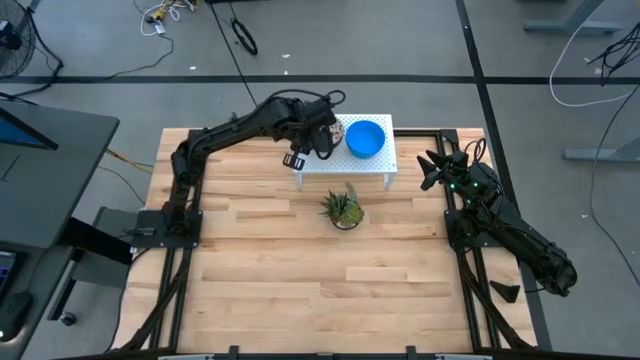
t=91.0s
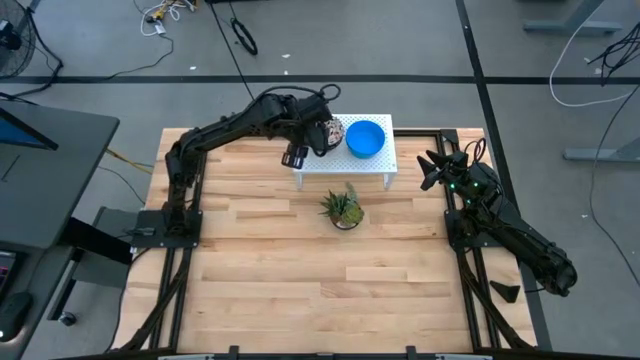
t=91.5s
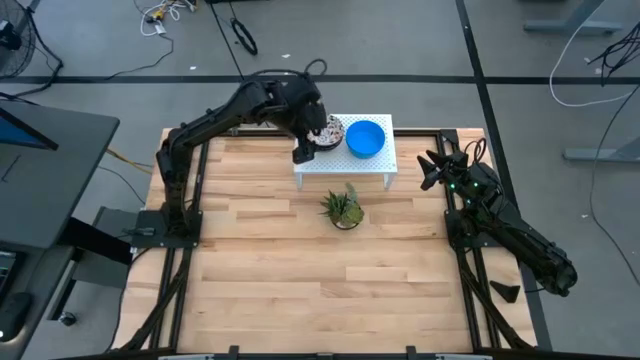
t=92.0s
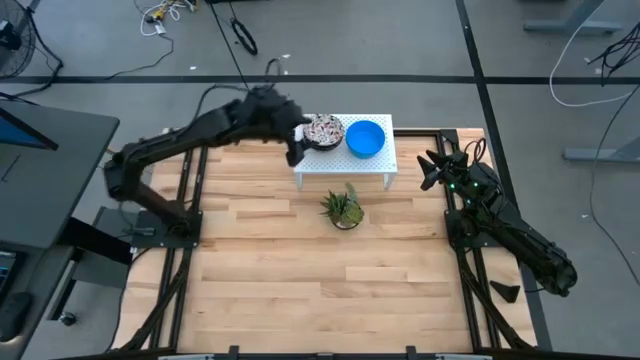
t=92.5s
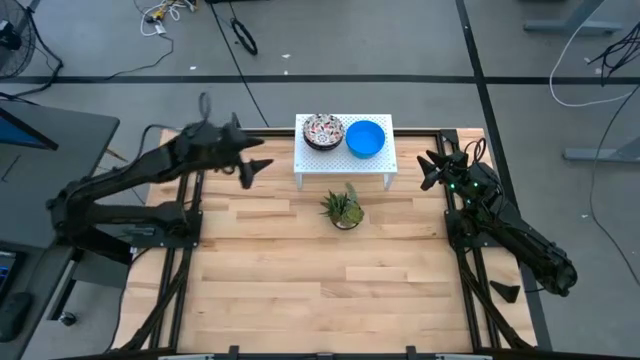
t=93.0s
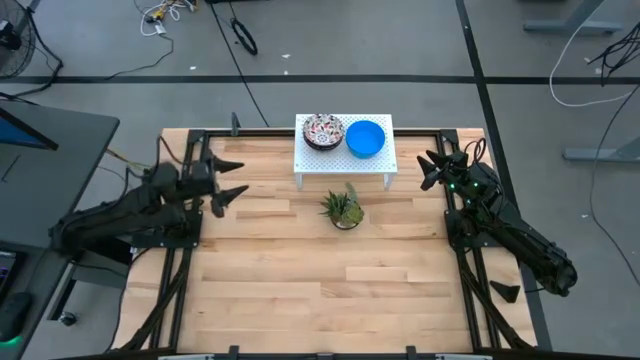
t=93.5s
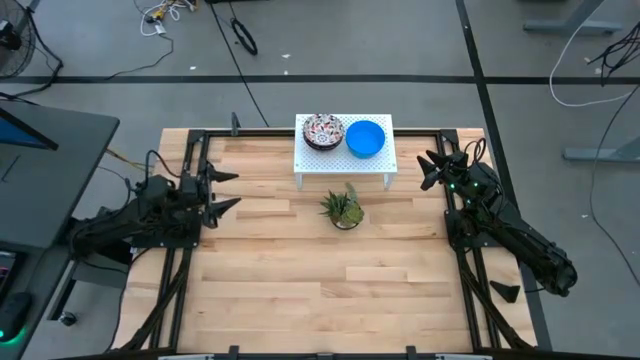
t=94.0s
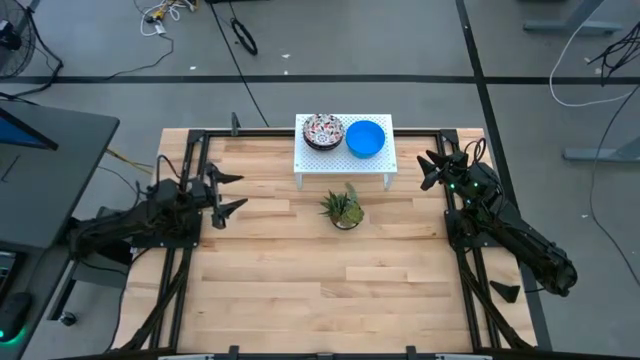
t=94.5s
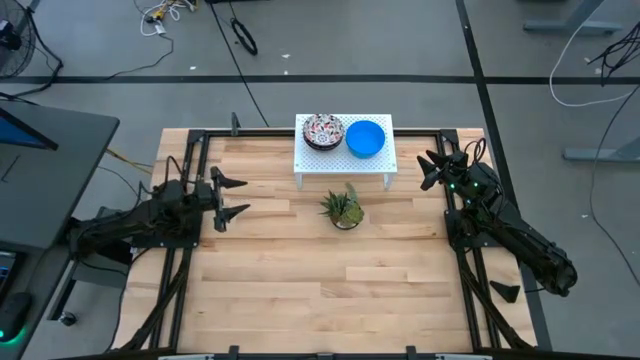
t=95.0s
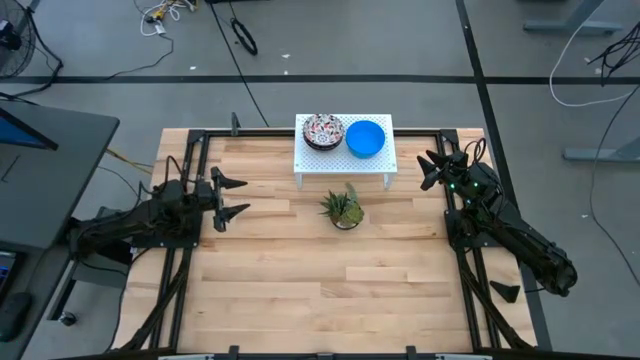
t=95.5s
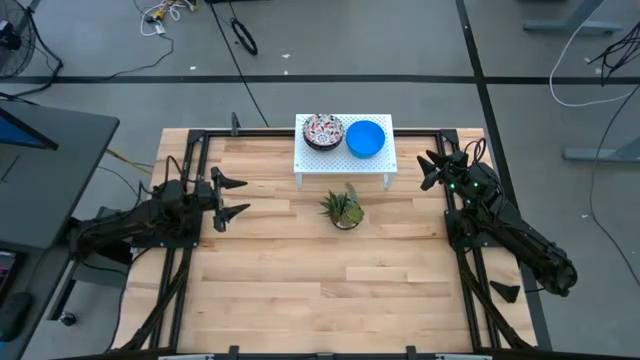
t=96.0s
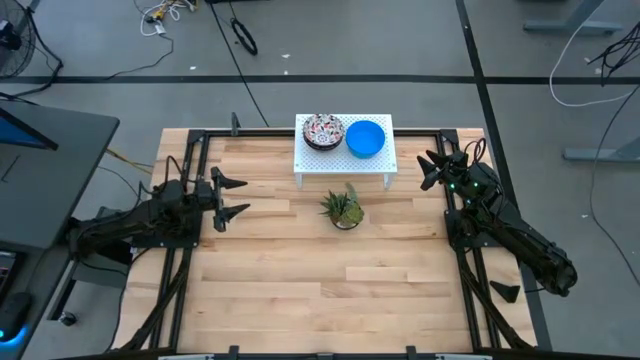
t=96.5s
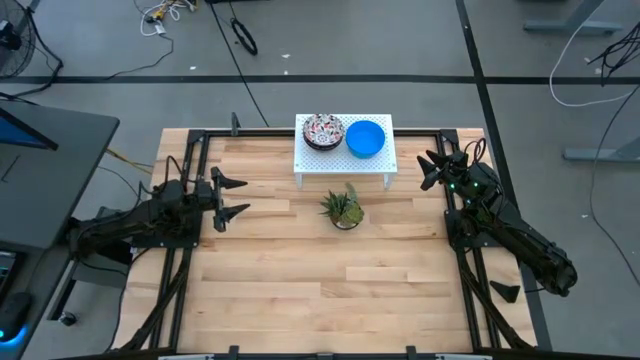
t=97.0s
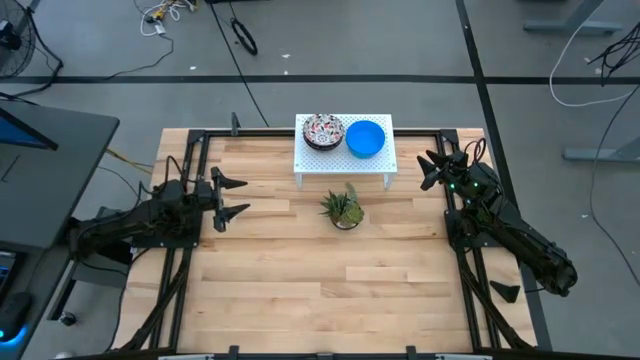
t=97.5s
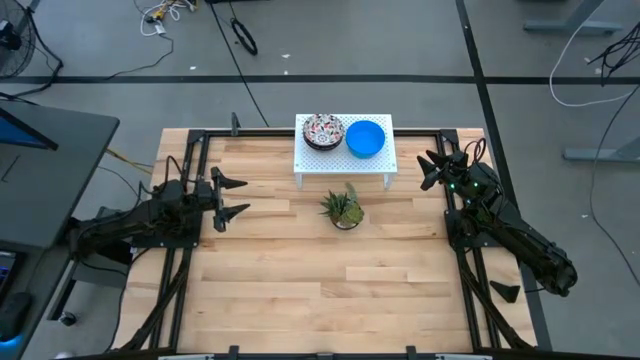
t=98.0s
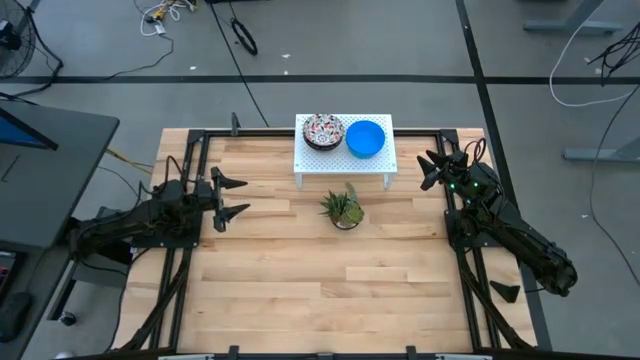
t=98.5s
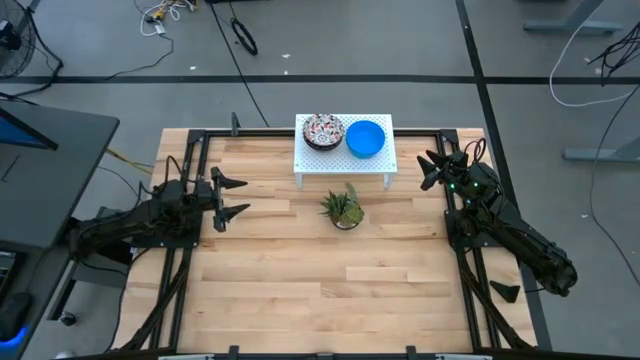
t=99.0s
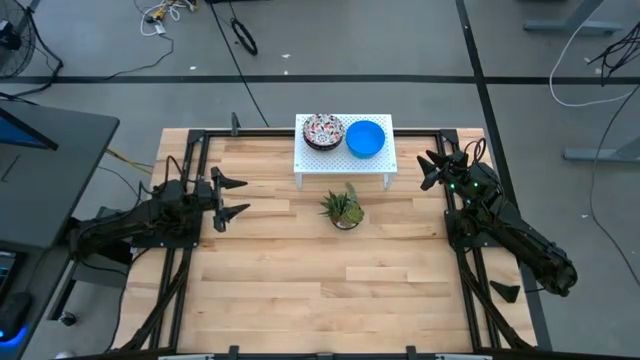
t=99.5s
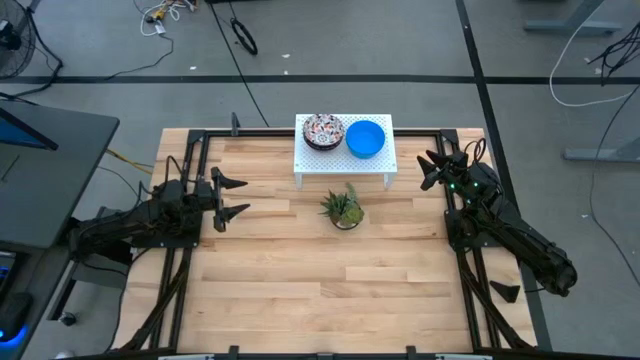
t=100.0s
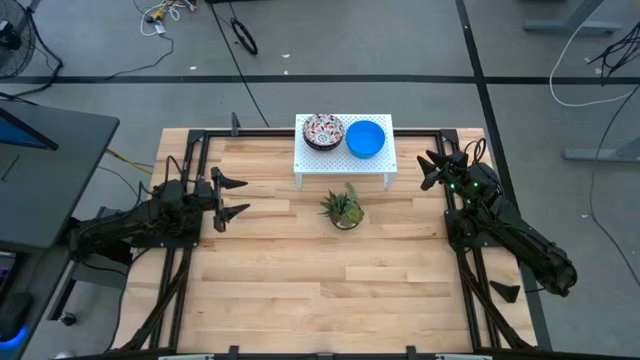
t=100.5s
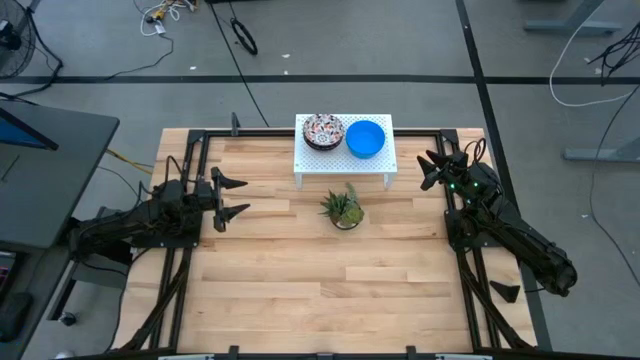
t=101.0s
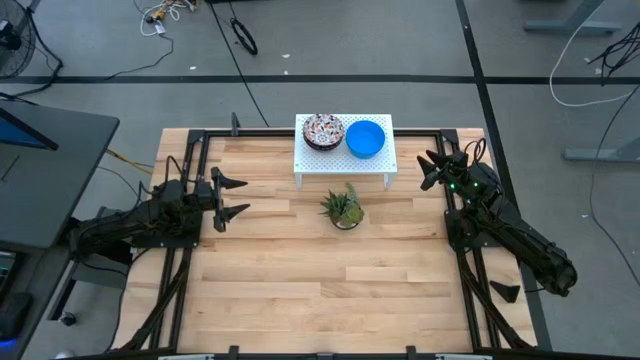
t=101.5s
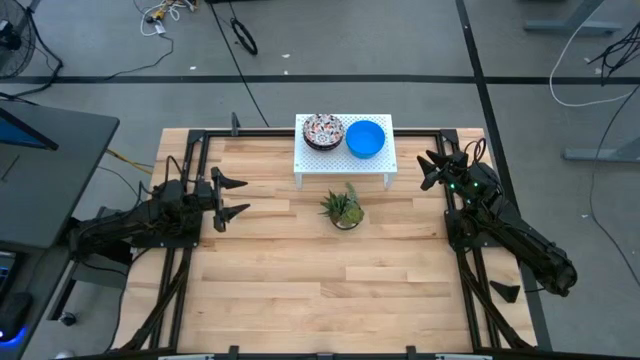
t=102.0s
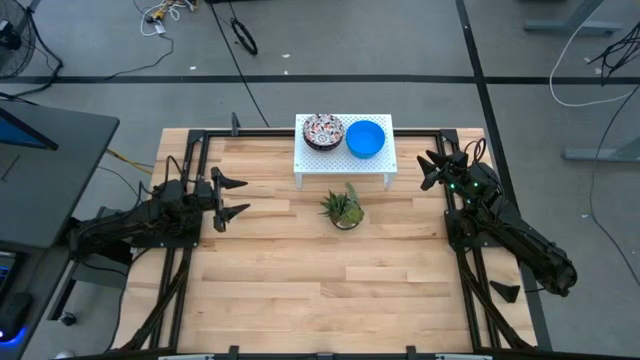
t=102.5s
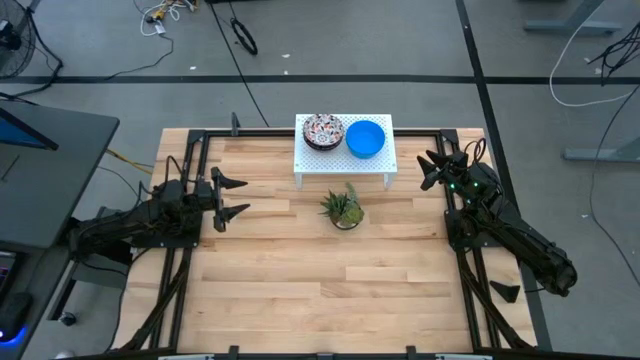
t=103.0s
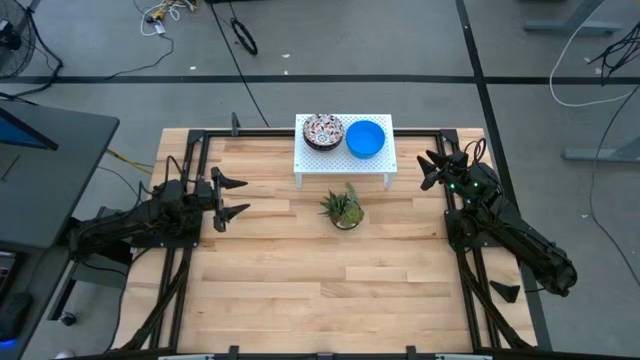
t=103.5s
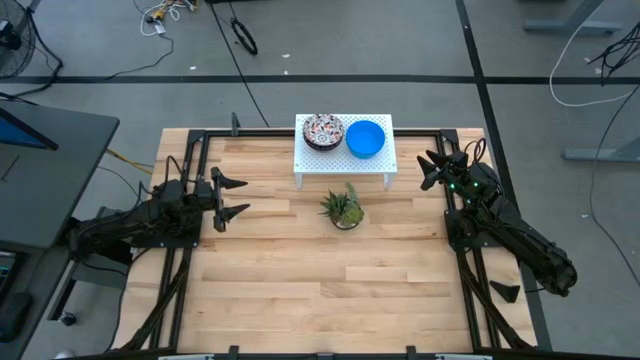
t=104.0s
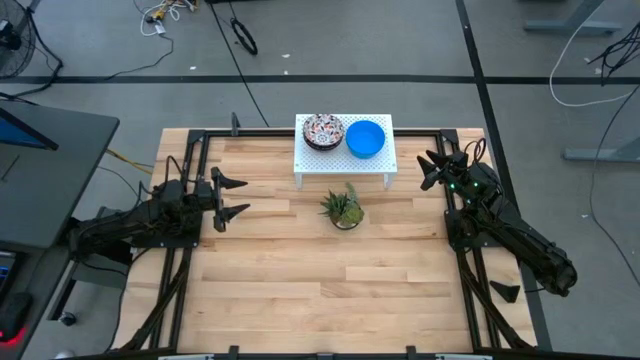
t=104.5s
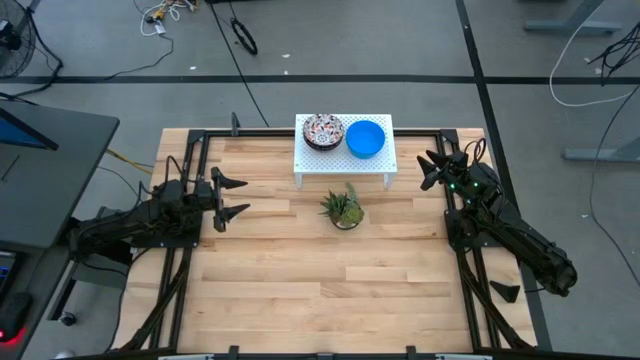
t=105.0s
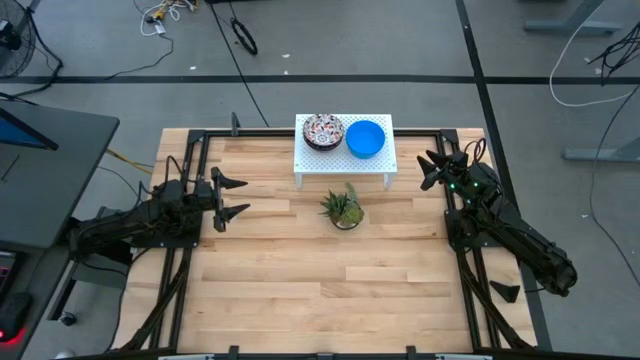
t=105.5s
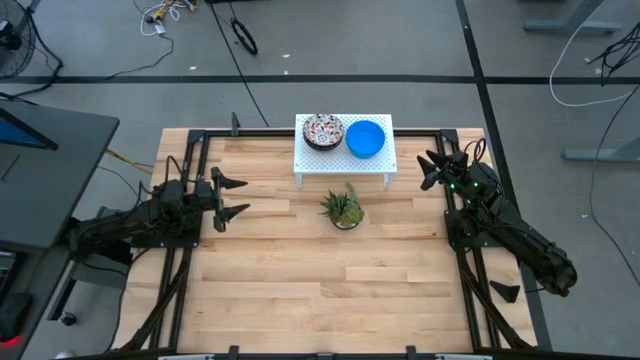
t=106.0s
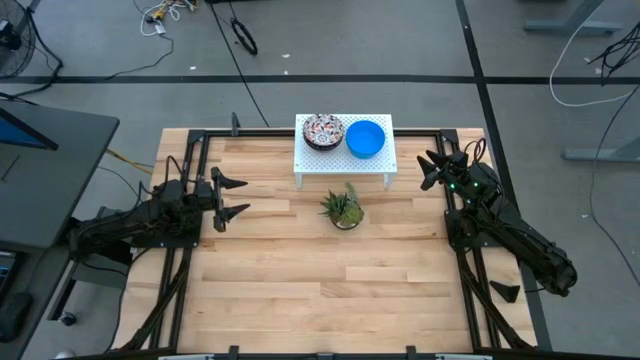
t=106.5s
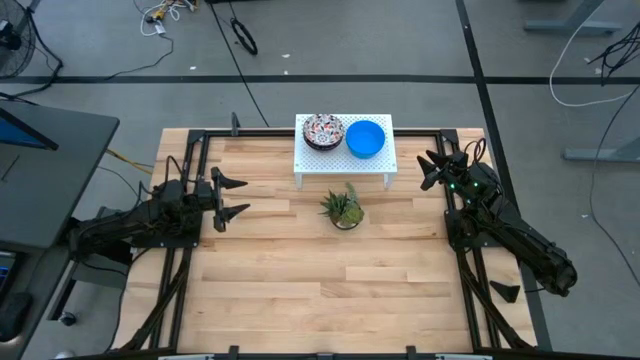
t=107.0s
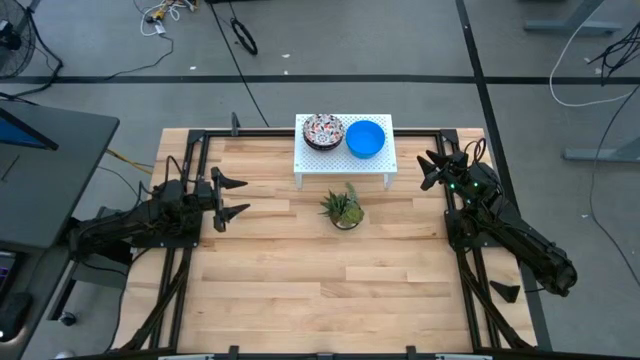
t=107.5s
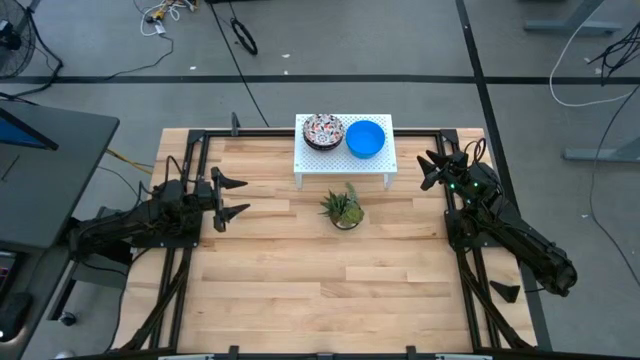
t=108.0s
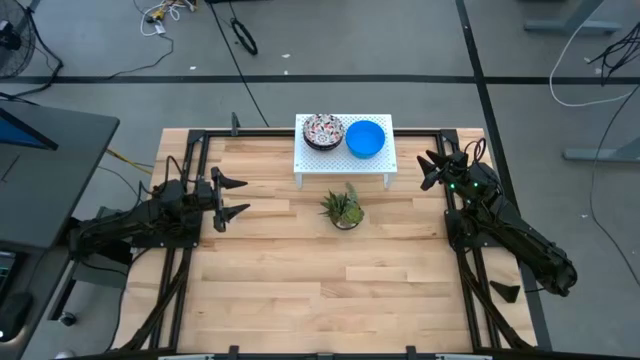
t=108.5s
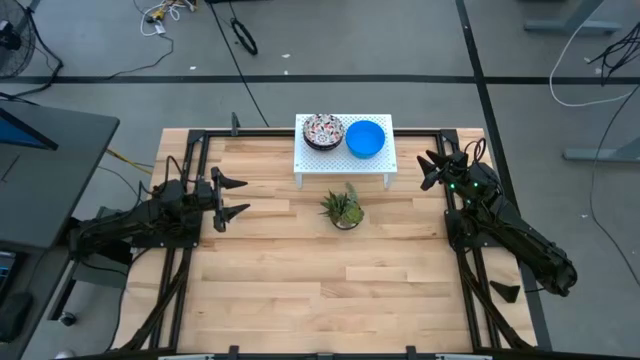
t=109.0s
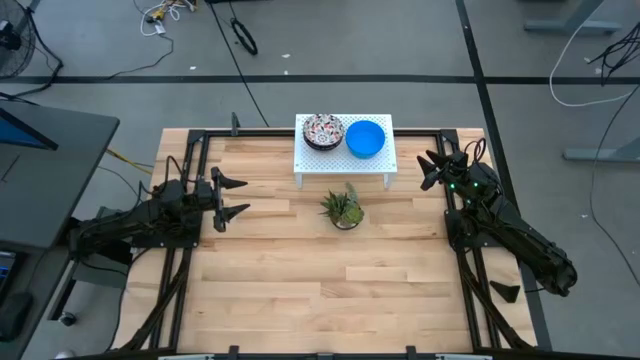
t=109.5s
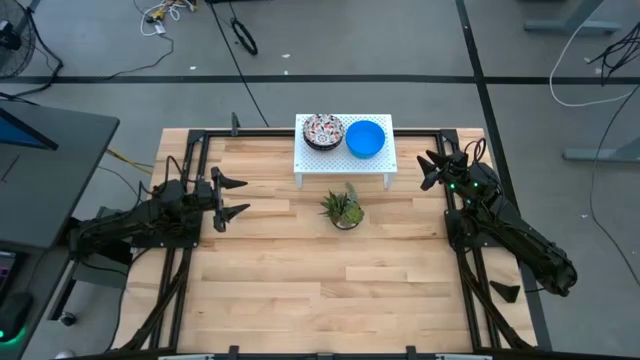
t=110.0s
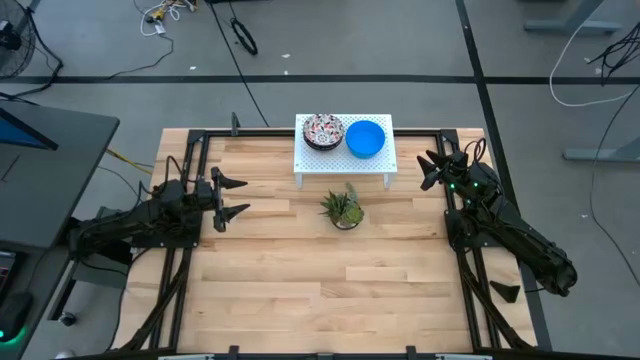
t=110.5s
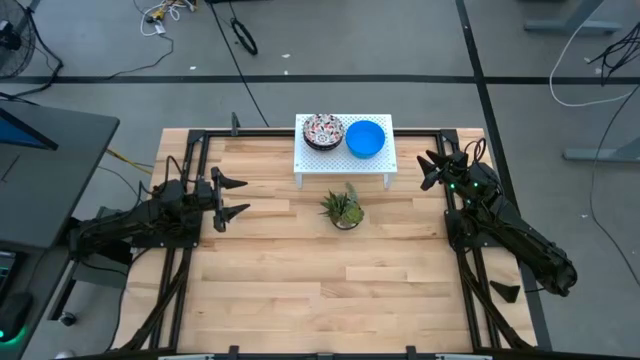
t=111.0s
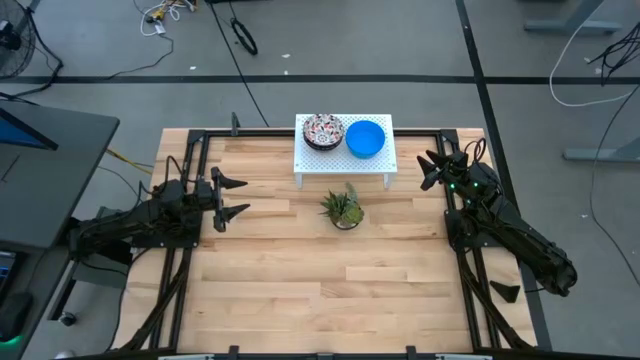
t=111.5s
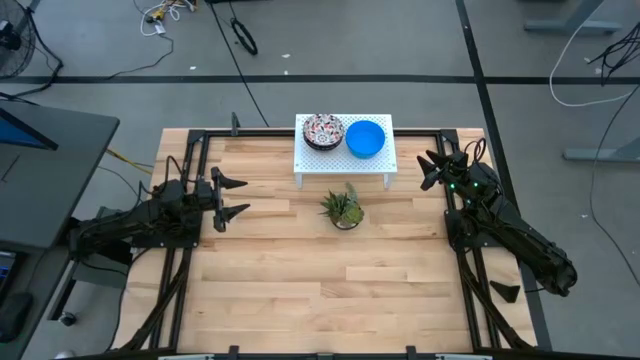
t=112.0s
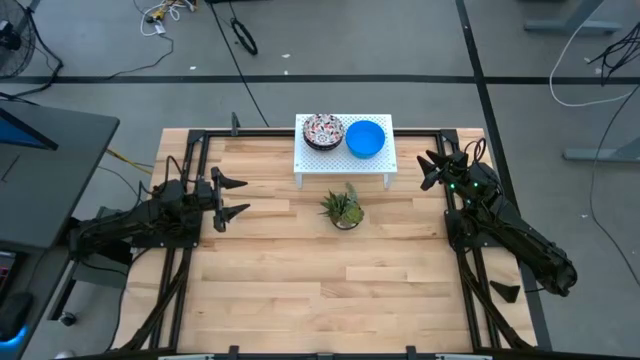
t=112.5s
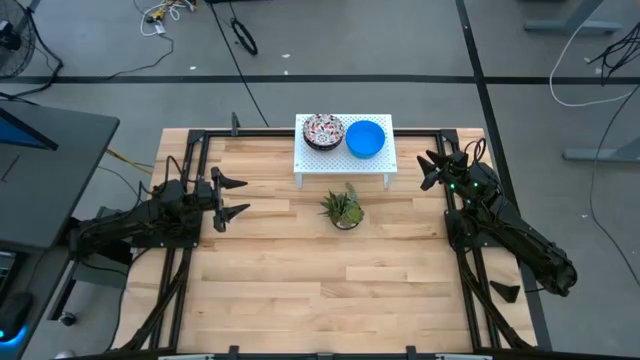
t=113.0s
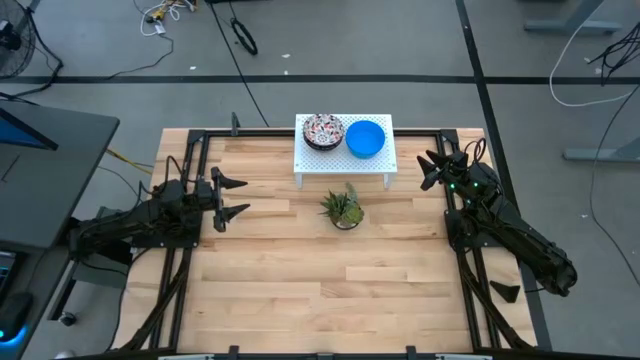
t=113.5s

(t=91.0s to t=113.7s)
Task: Pick & Place Mini bowls
Return to Home Position
